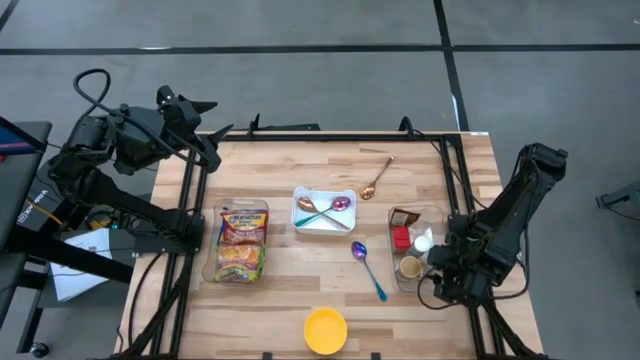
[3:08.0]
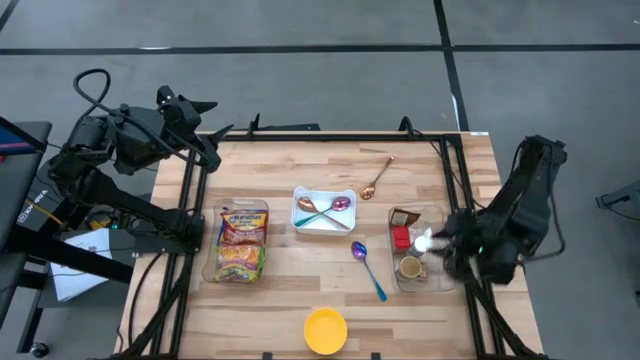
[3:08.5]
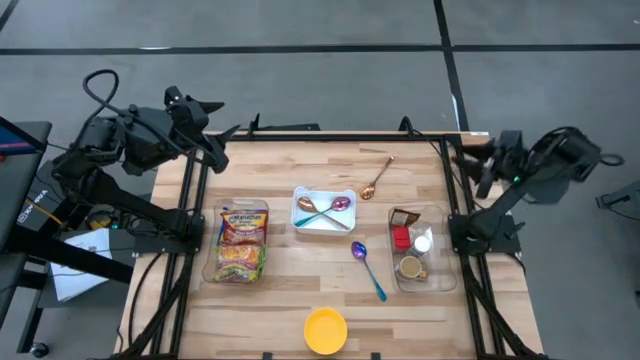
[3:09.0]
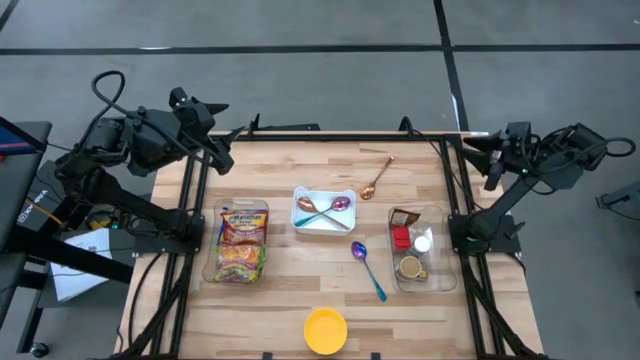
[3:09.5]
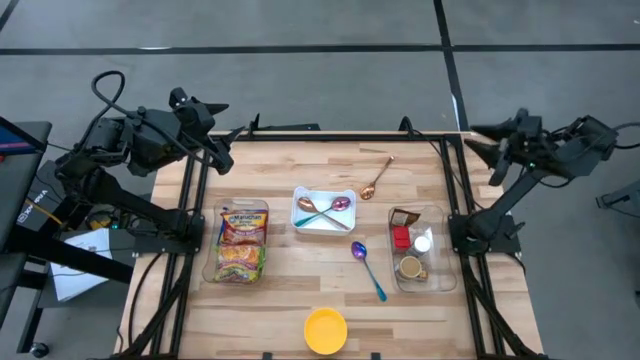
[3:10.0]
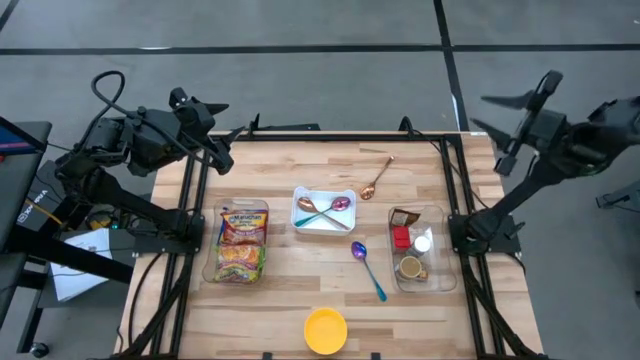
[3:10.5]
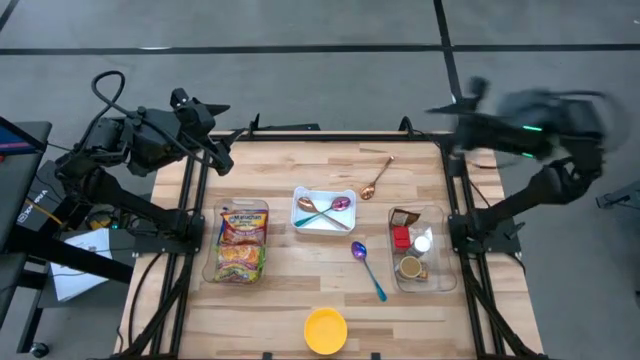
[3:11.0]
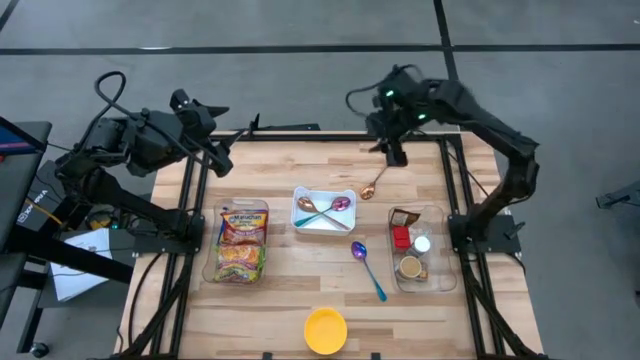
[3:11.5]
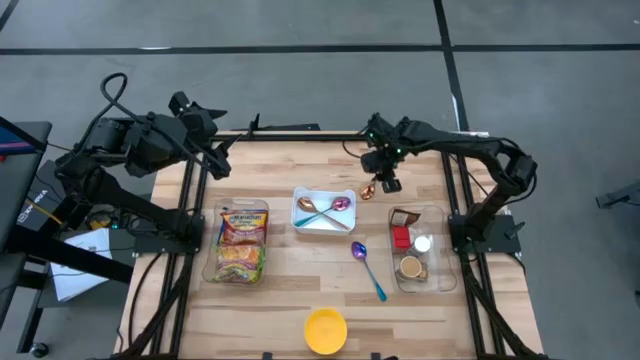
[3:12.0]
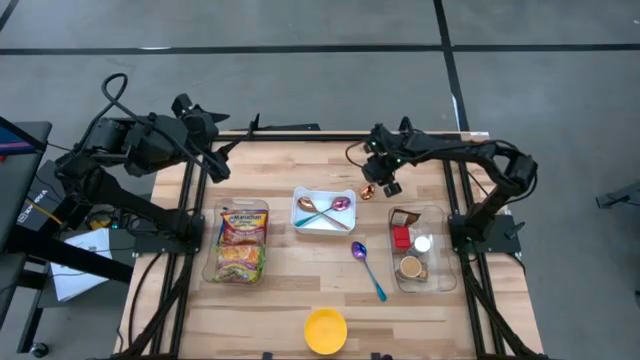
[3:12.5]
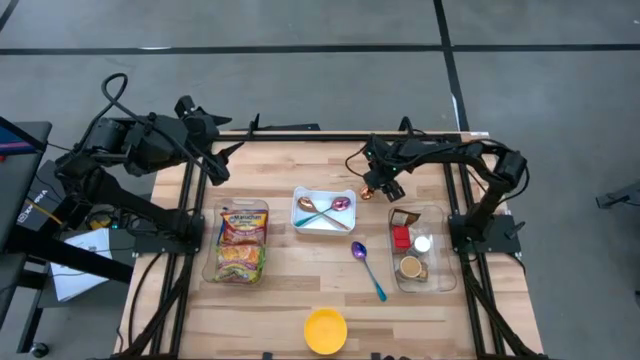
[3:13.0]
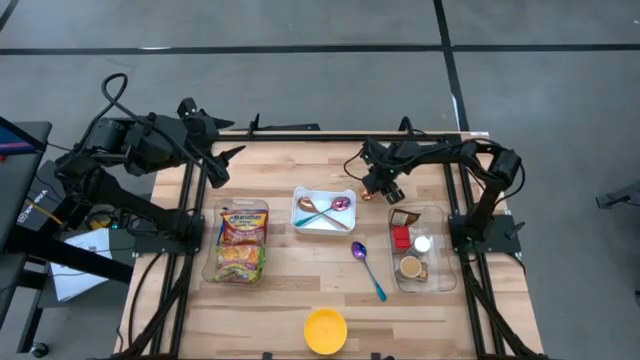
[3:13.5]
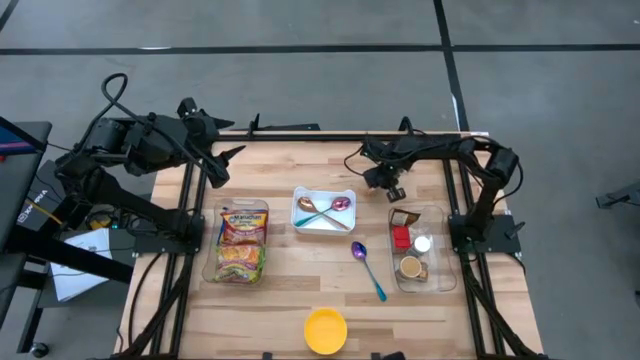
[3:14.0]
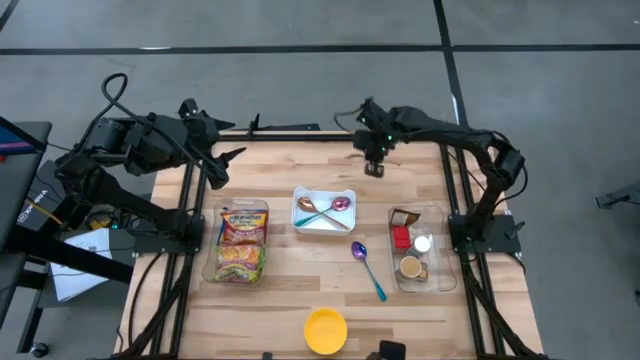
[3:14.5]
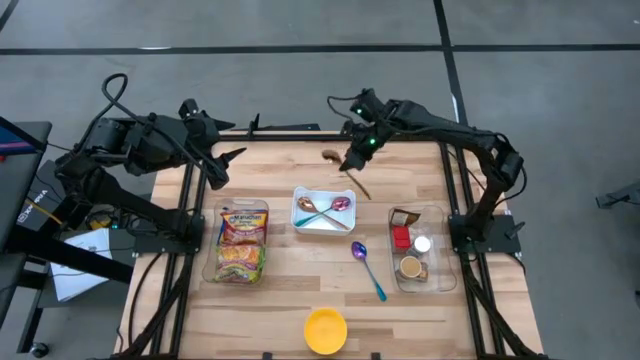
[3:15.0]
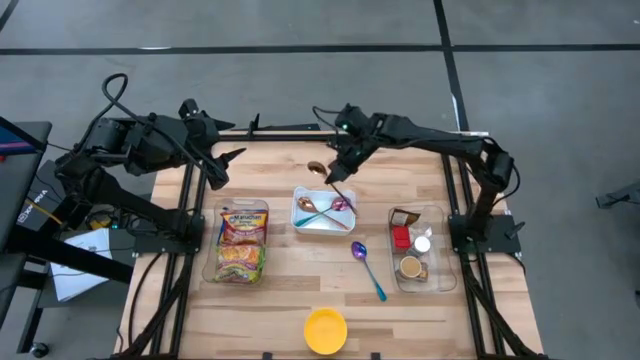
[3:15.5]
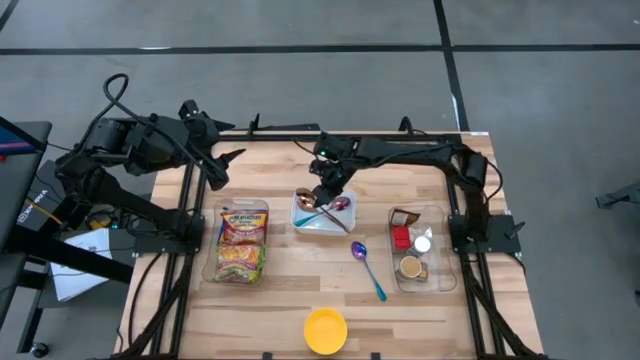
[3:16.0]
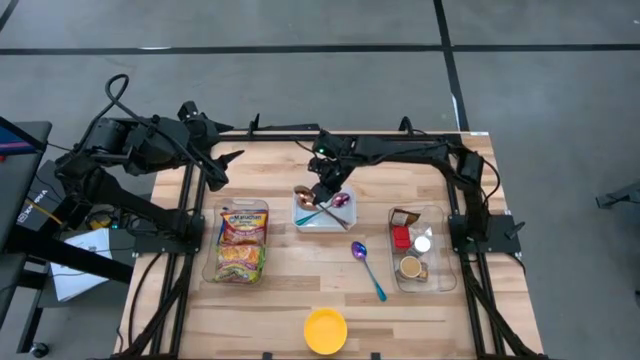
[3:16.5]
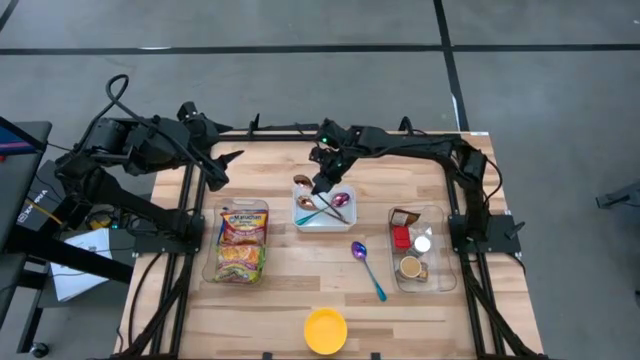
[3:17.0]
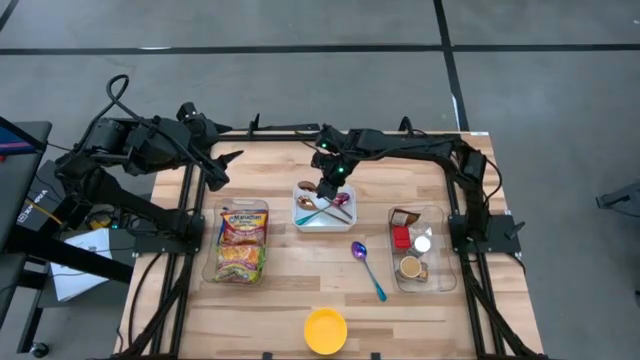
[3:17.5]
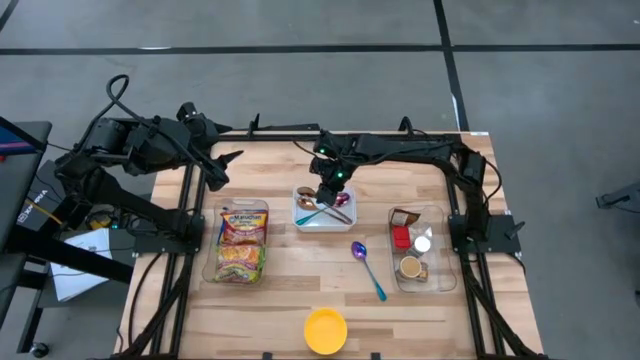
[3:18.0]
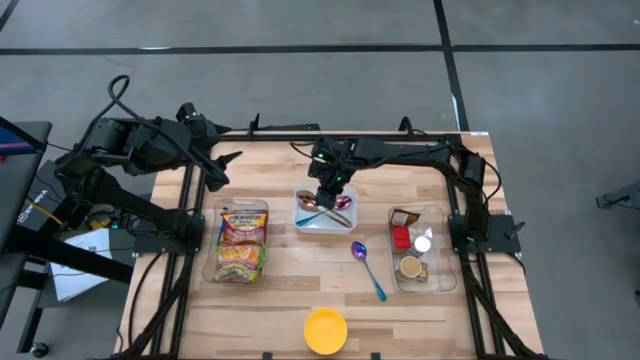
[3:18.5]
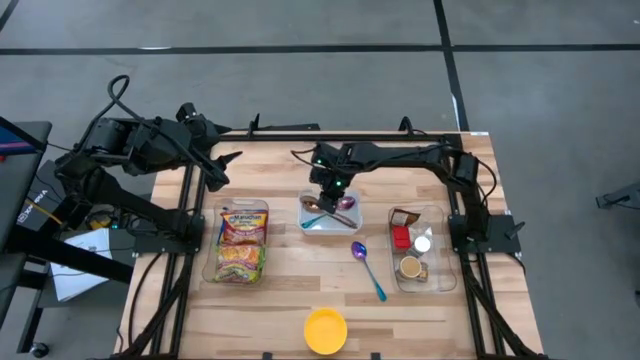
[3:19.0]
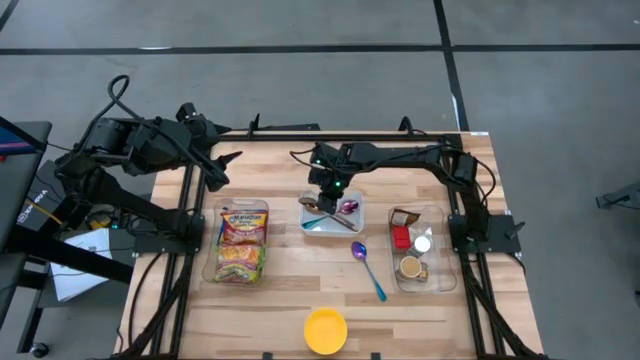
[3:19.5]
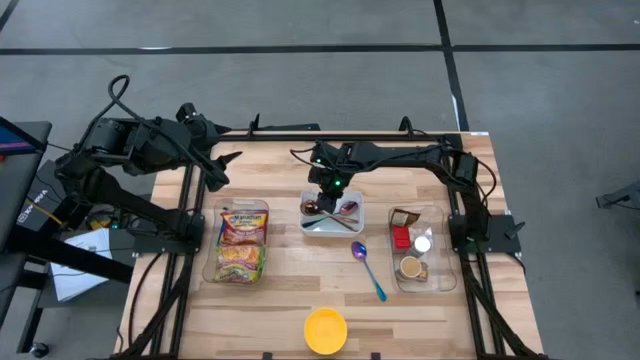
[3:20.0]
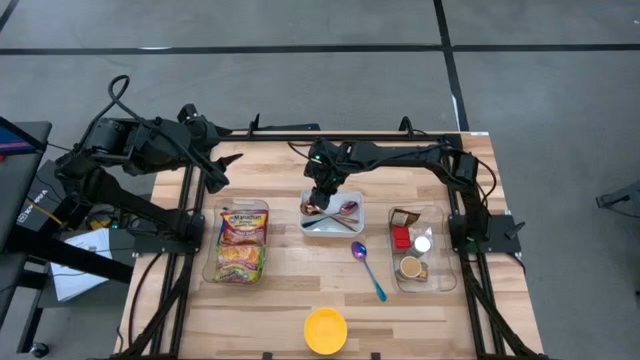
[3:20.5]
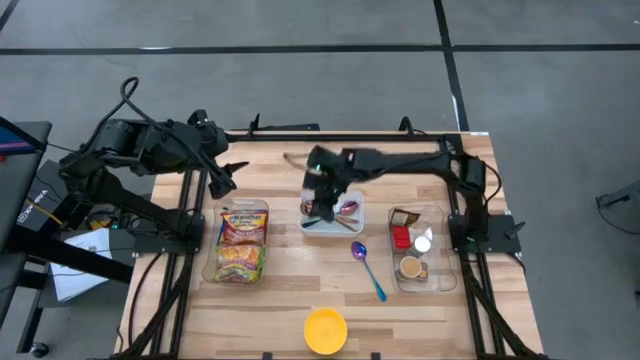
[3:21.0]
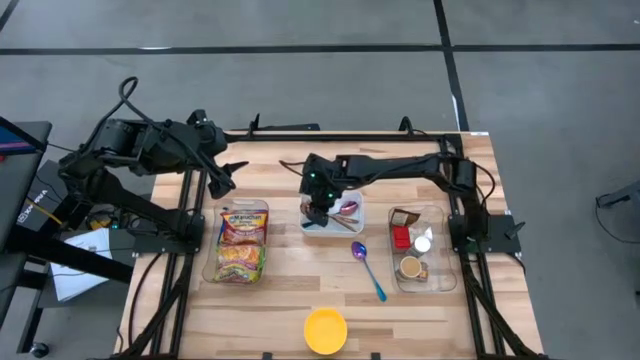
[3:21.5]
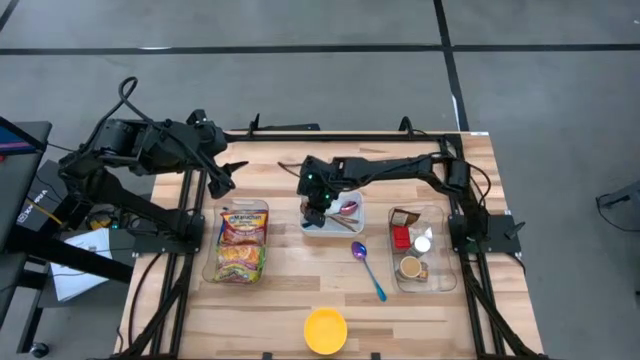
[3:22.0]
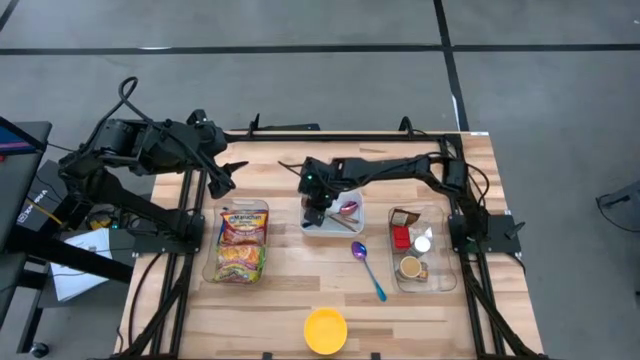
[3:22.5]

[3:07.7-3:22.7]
Task: Pick & Place Food Item
Put the gold spoon into the white bin

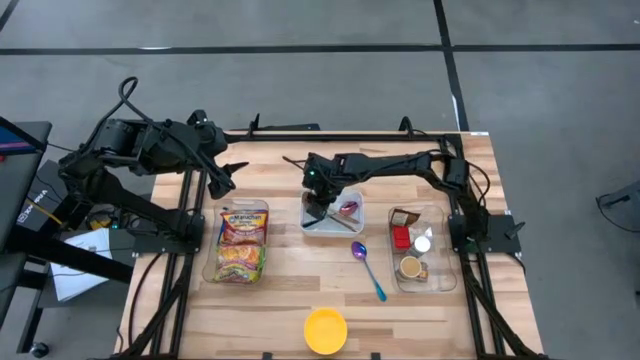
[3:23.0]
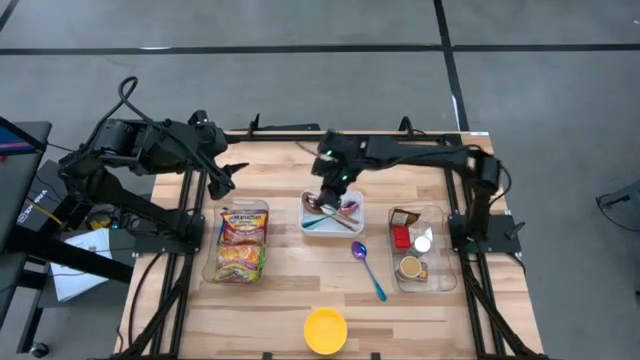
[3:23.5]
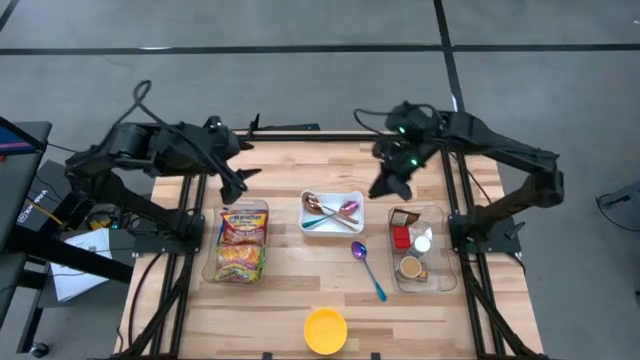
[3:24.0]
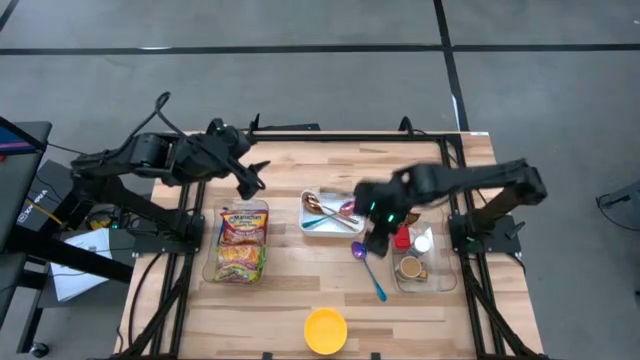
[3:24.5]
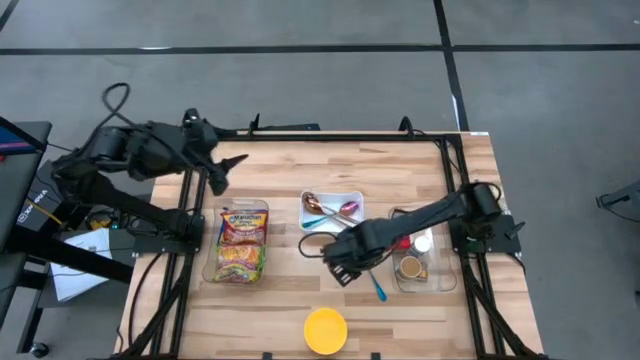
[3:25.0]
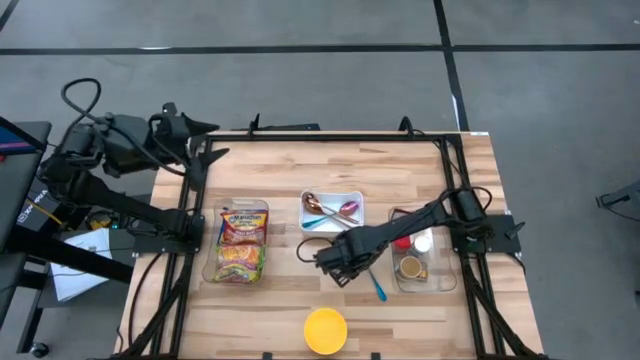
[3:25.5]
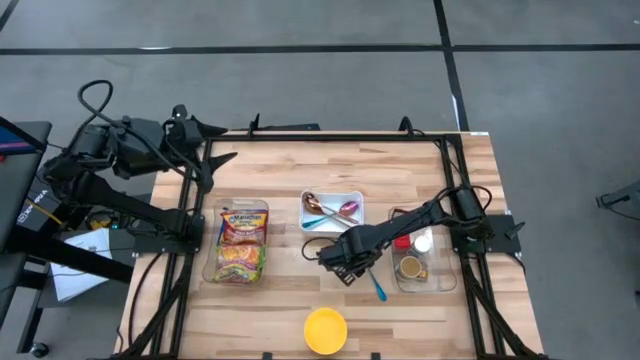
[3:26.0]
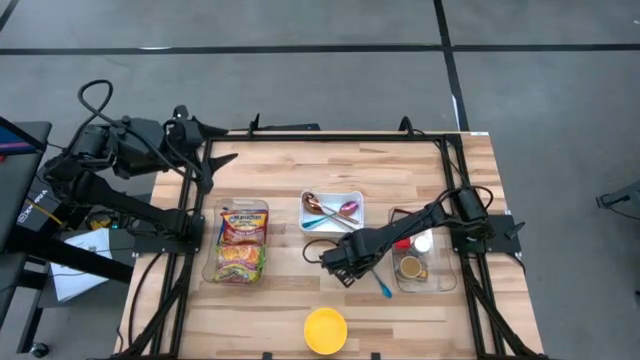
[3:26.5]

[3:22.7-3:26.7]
Put the violet spoon into the white bin

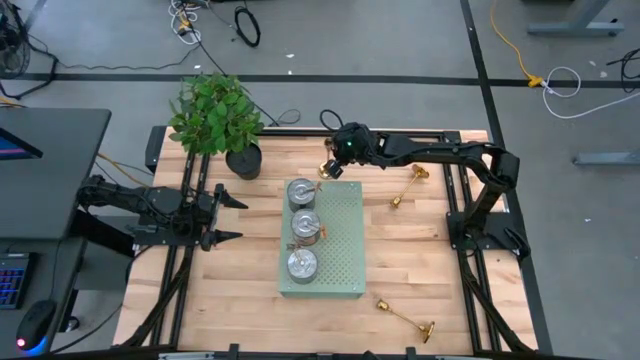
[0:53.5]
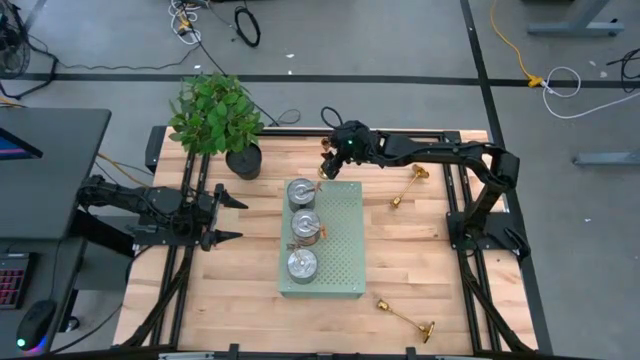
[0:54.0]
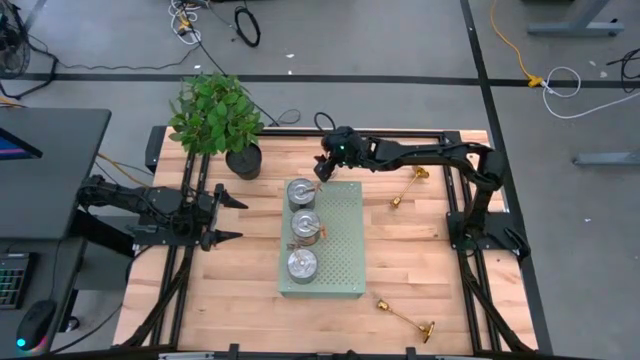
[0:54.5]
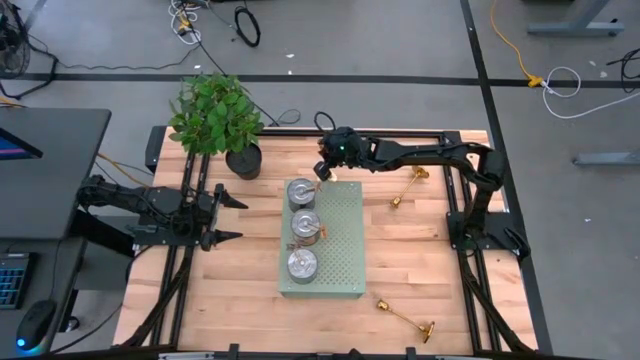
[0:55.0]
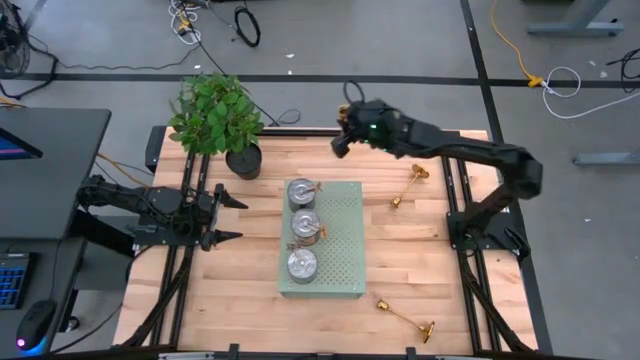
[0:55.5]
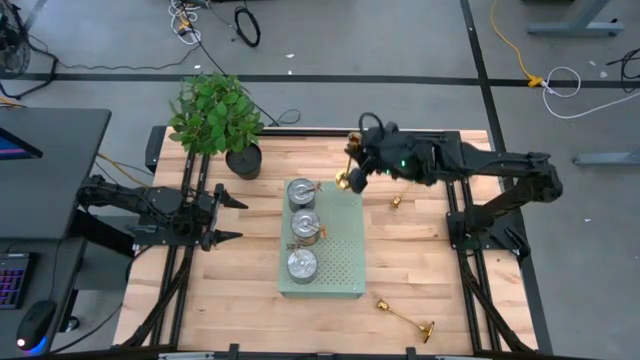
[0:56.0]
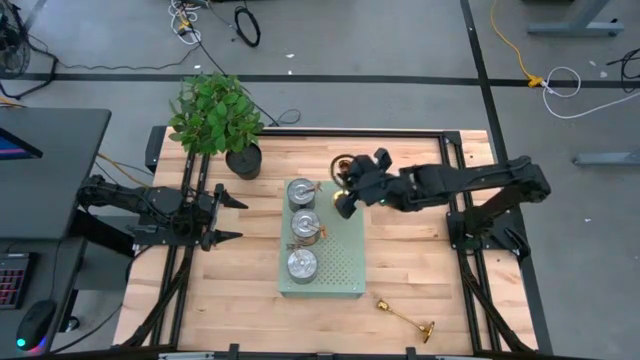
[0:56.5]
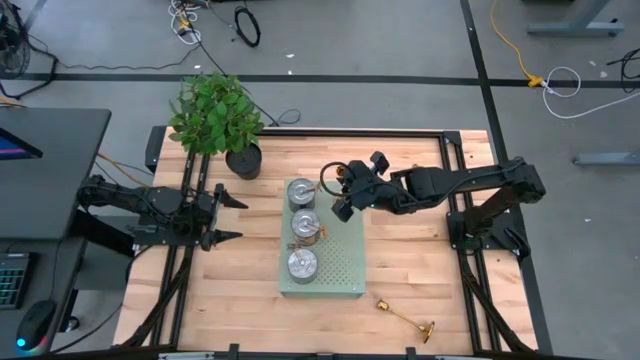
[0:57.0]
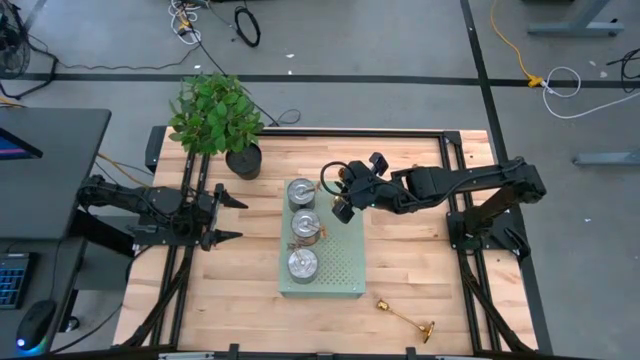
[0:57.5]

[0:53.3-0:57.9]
Task: Pick & Place candle stick holders
Put the top left golden candle holder aligned with the orange scented candle on the shelf
